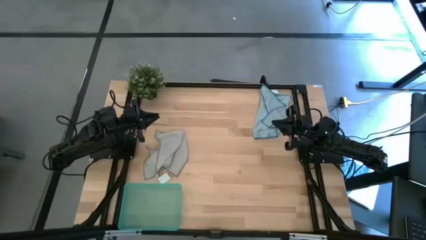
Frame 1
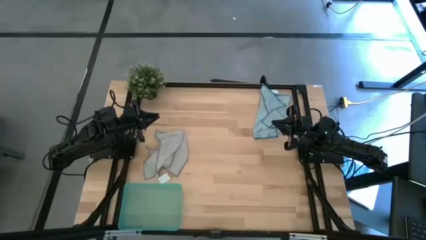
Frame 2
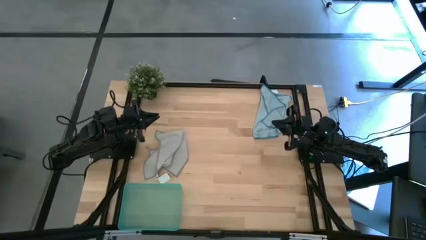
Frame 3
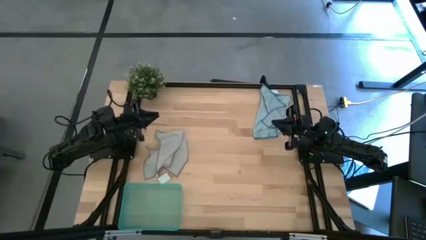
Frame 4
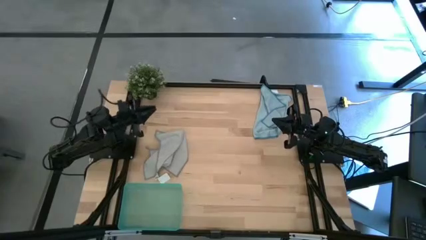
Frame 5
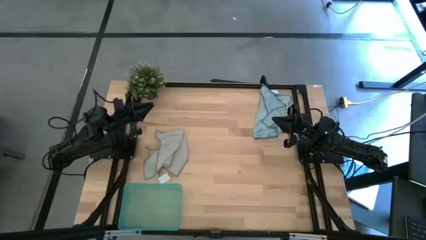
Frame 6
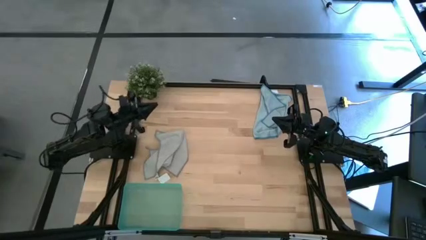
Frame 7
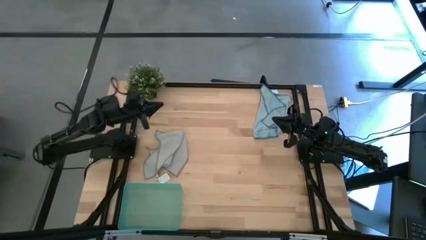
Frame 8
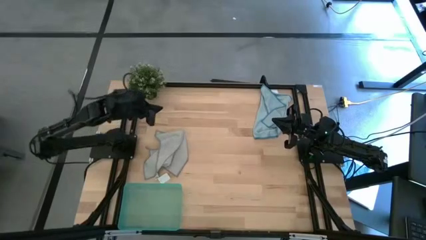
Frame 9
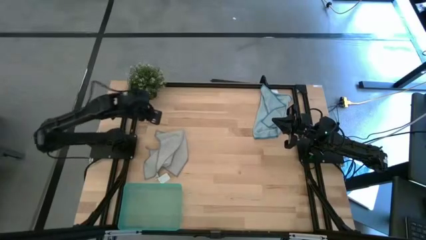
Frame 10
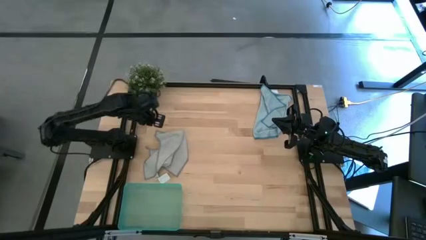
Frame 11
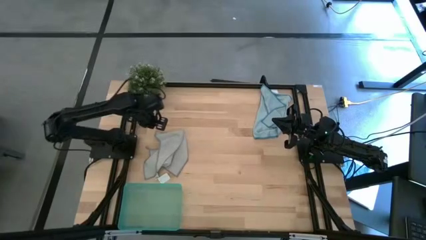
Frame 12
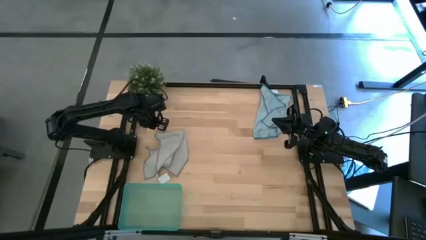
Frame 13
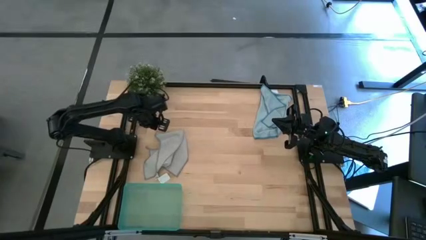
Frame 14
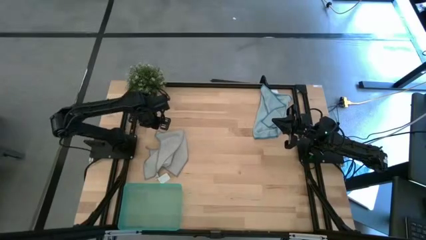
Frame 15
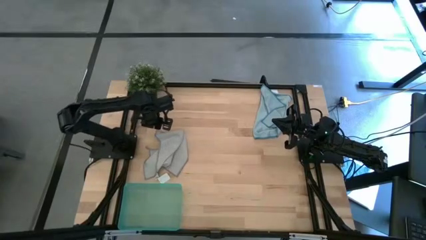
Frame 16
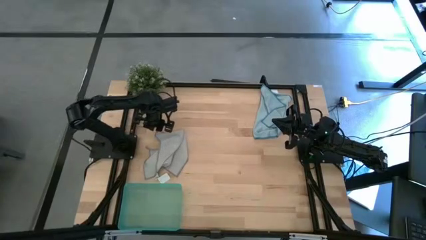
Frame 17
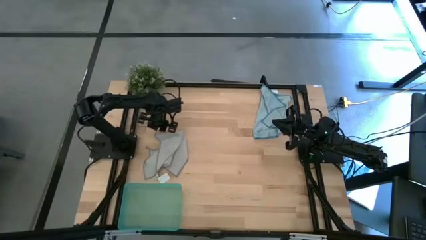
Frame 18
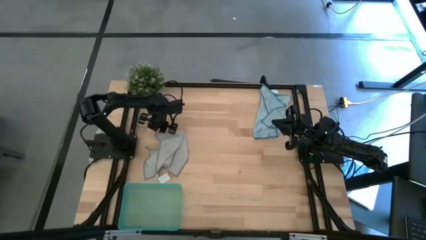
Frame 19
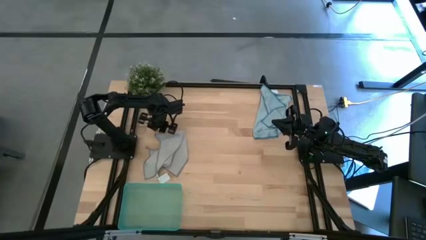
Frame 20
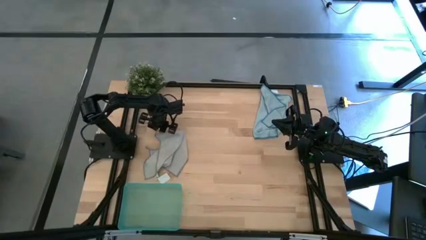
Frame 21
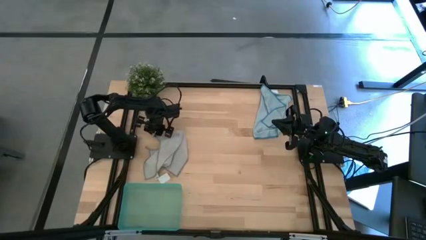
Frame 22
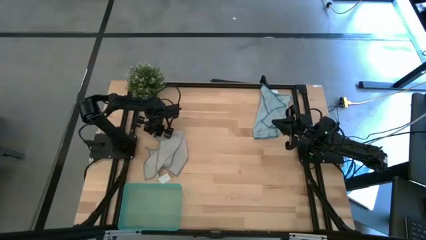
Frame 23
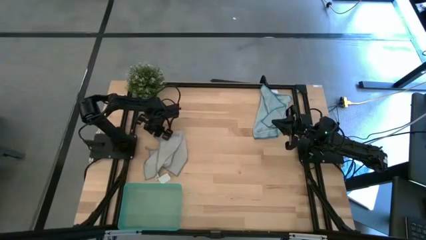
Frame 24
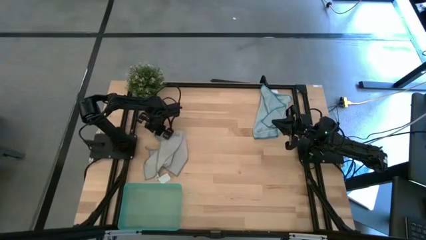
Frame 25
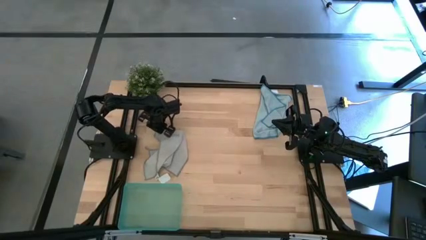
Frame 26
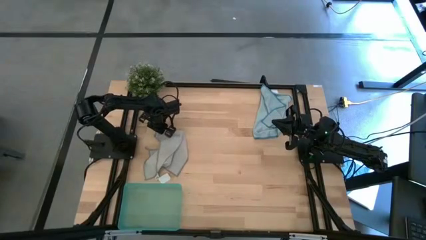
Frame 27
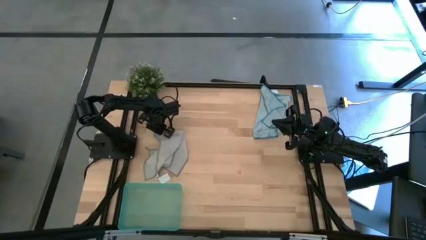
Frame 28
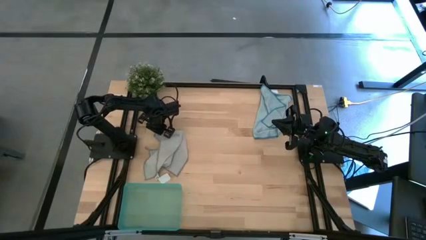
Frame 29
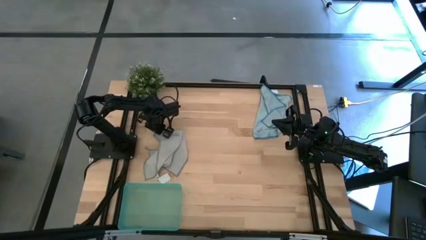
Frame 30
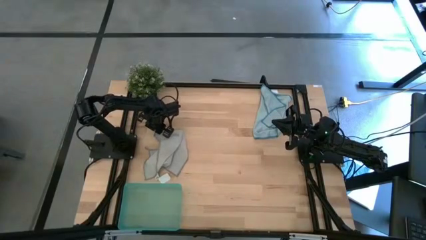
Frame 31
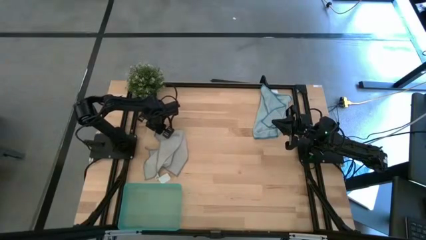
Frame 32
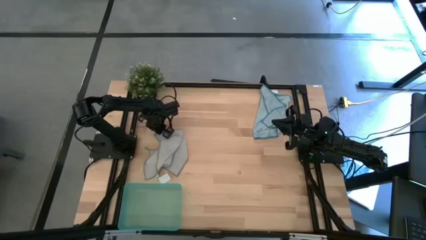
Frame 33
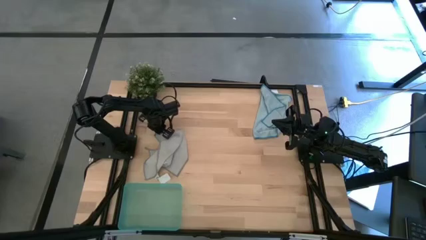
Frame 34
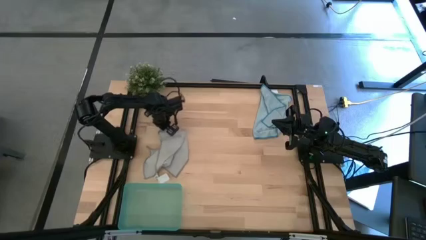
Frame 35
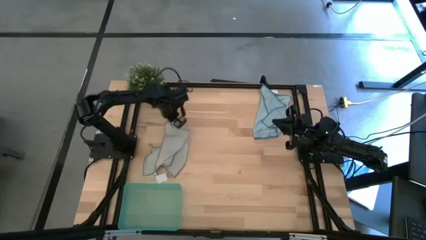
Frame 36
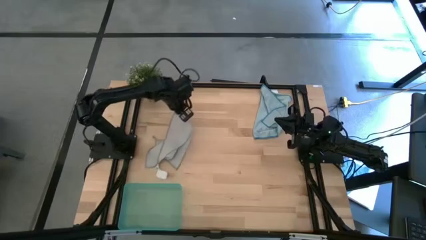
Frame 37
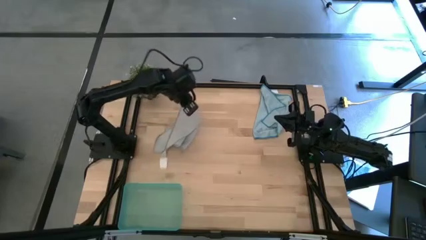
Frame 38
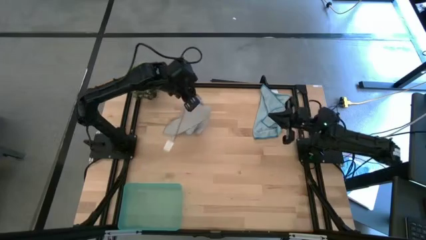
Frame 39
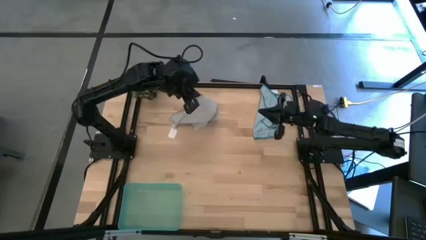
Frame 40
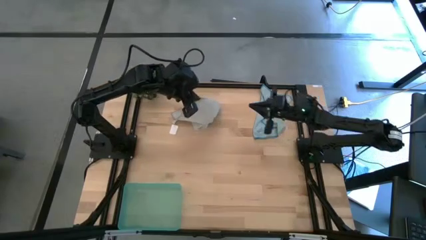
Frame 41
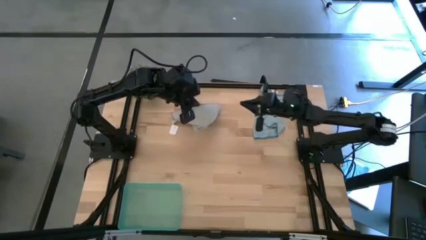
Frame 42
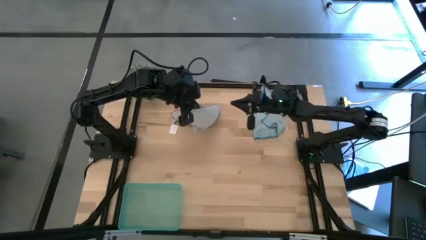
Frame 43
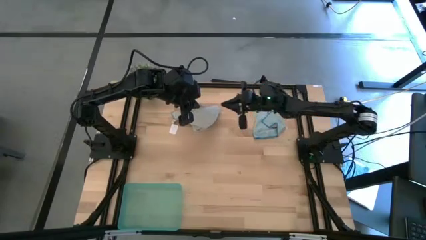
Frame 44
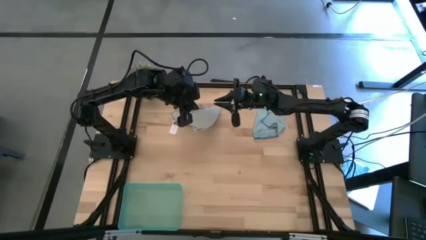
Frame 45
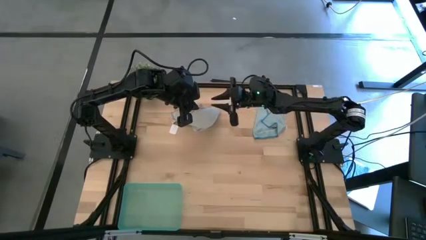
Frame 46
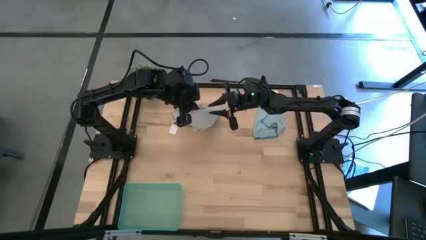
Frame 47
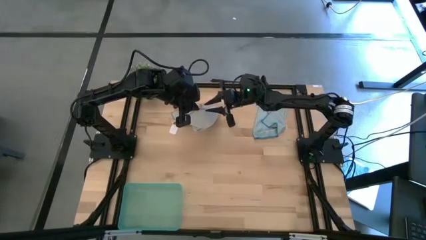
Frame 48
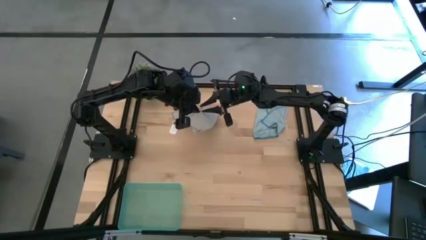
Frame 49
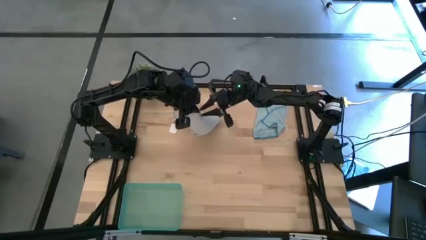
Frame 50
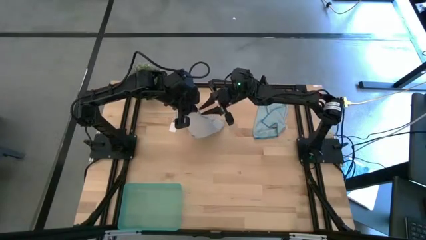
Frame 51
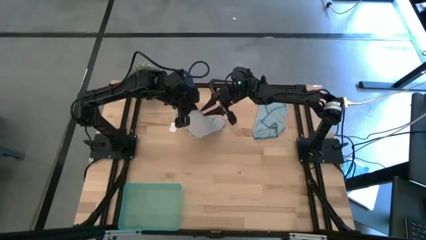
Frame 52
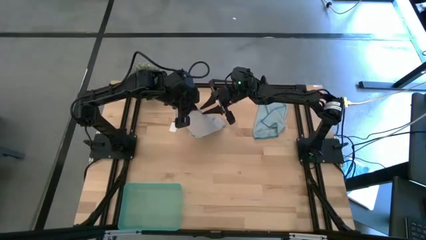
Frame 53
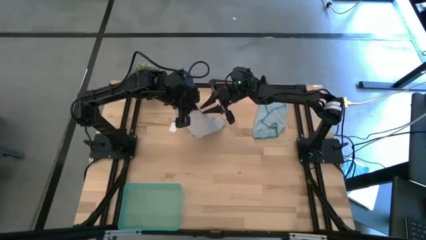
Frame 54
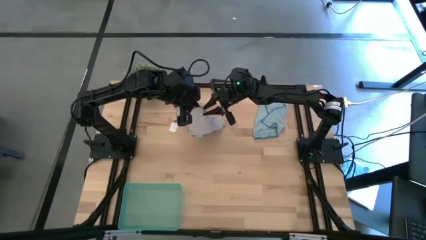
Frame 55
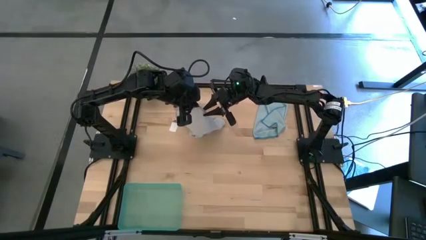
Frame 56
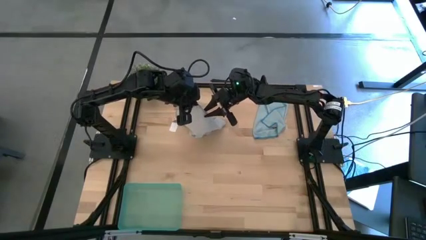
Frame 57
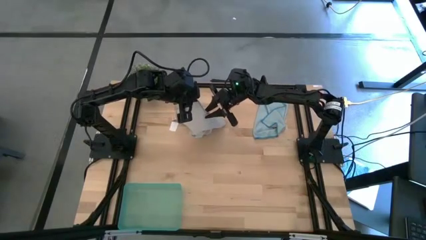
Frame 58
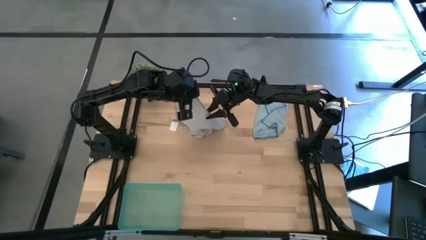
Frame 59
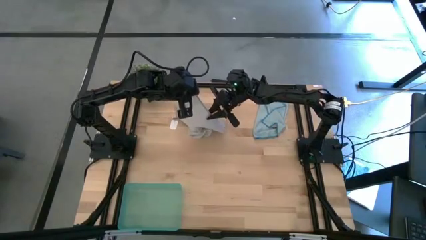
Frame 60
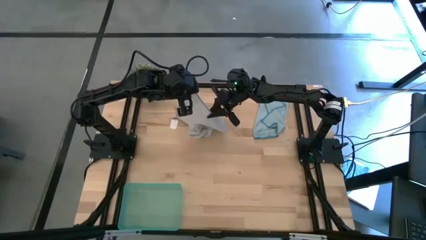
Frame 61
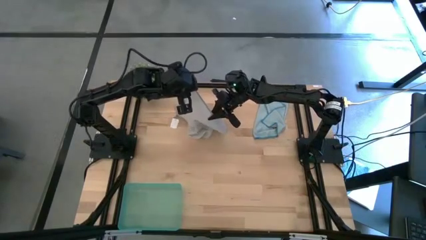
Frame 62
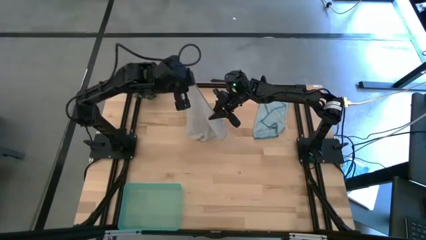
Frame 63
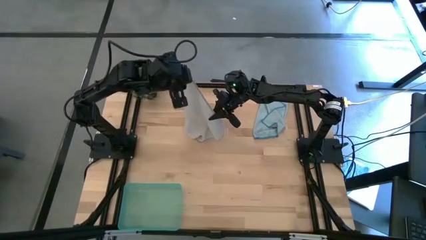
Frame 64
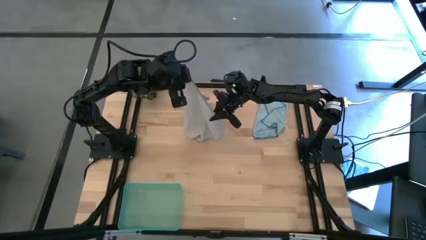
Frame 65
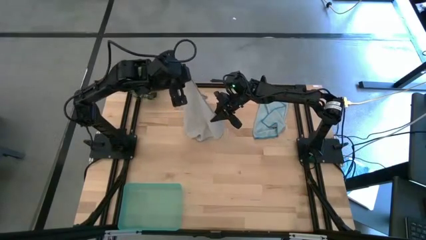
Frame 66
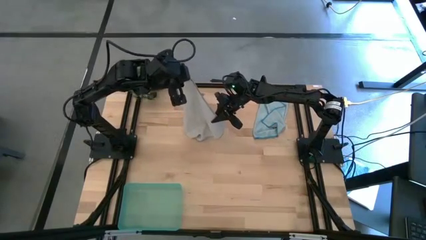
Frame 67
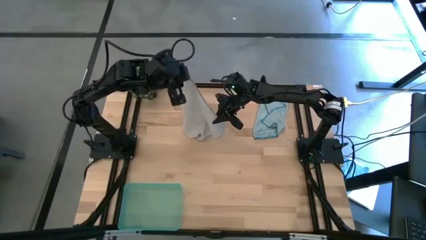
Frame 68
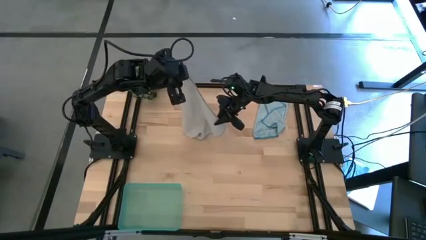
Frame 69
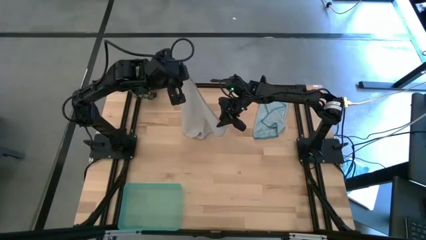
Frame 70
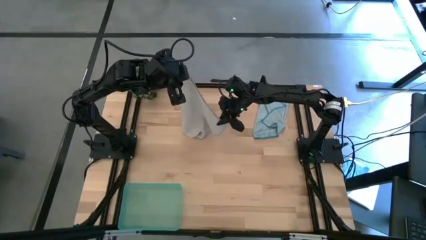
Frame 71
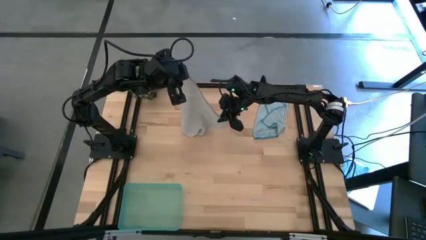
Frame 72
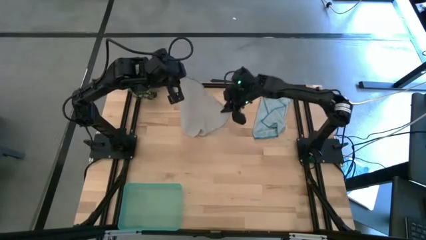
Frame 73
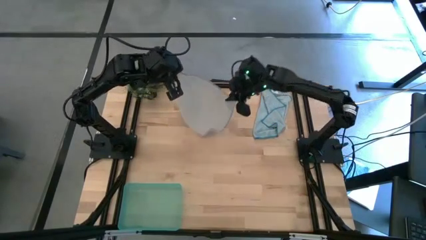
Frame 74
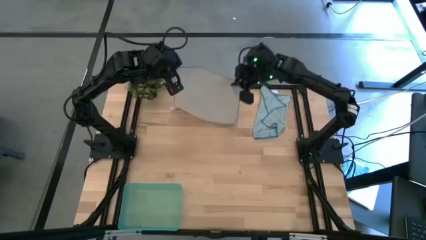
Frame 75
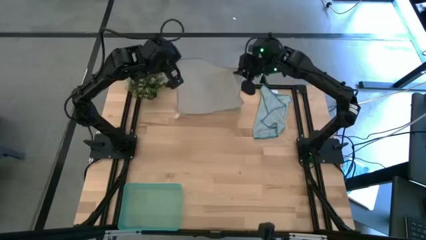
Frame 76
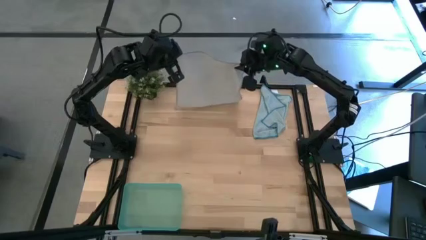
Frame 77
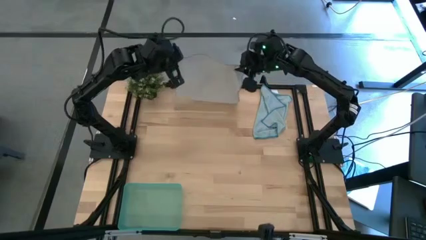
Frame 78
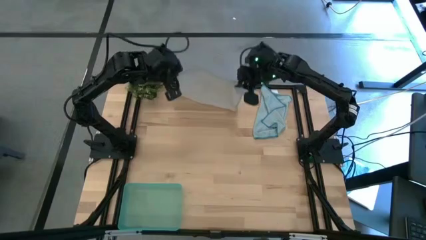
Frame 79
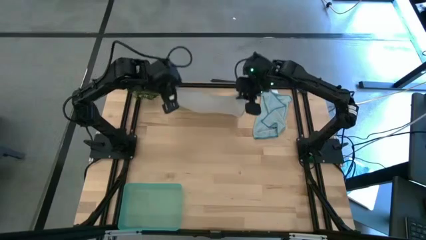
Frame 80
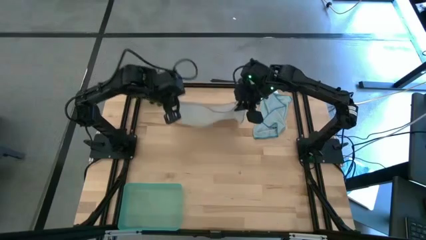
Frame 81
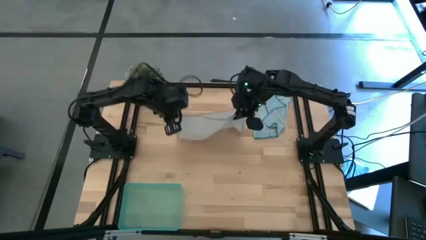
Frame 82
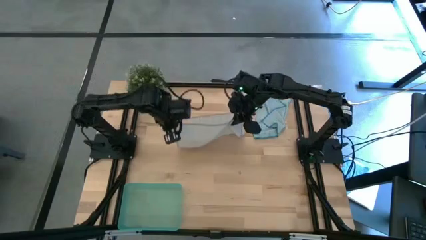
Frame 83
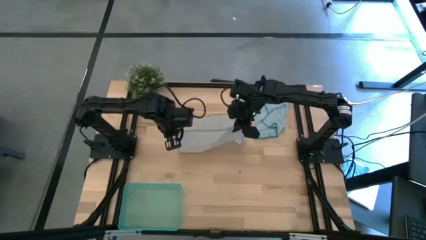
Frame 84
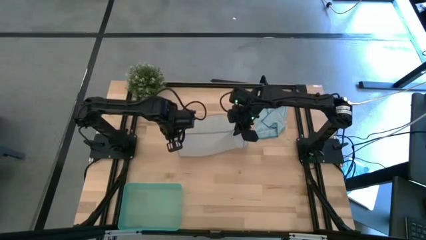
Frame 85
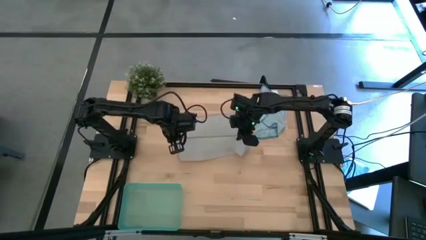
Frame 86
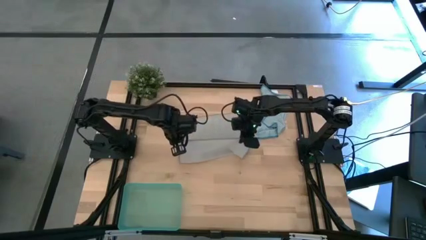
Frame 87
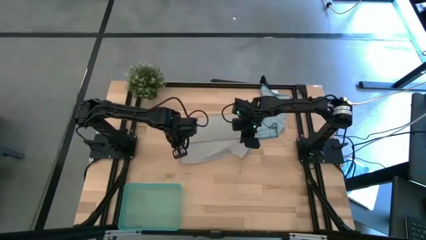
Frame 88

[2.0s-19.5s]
Task: Roll microfiber towels into tight, uniform cylinder then place into a basket
Roll the gray microfiber cloth
